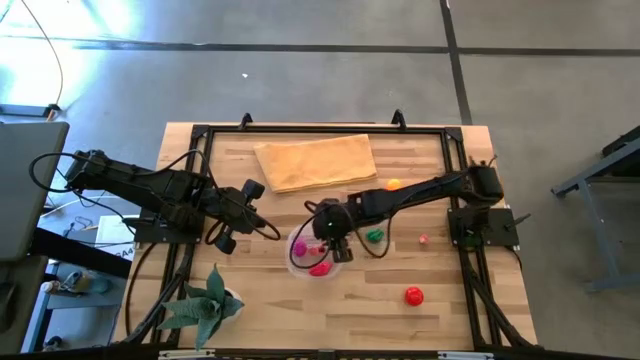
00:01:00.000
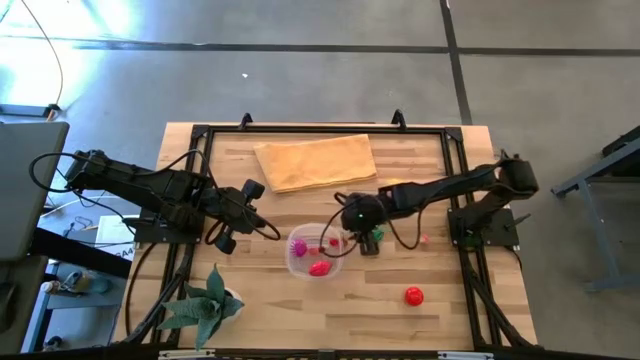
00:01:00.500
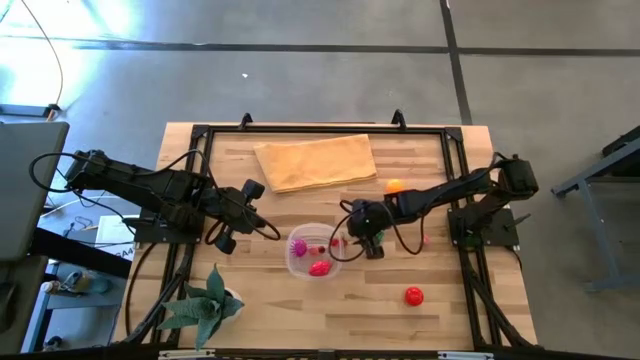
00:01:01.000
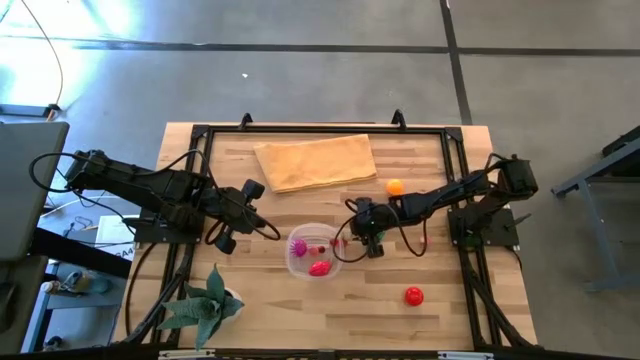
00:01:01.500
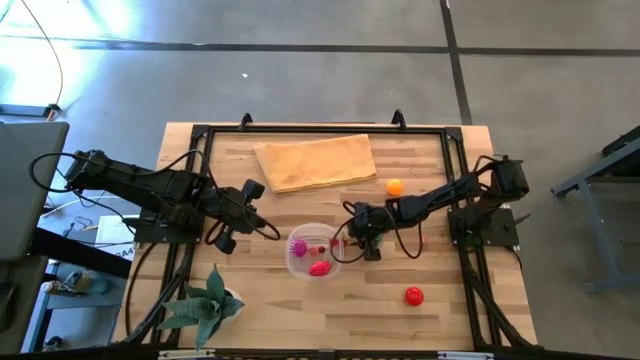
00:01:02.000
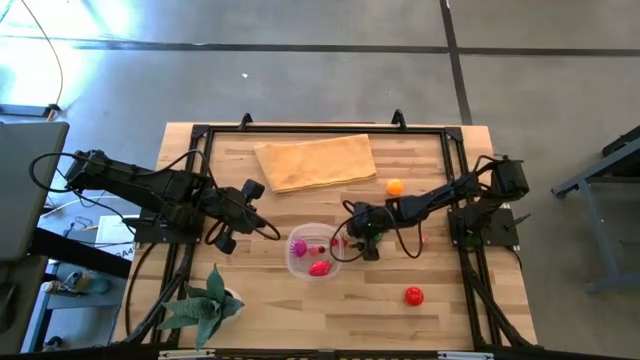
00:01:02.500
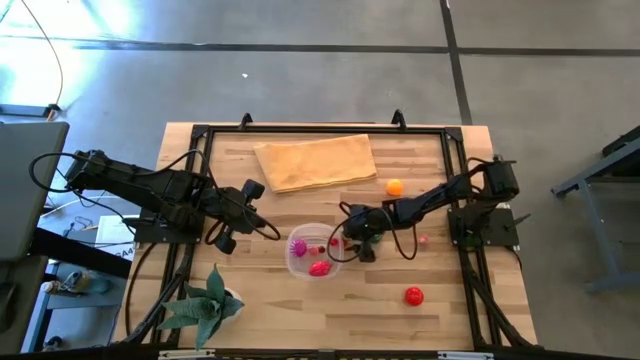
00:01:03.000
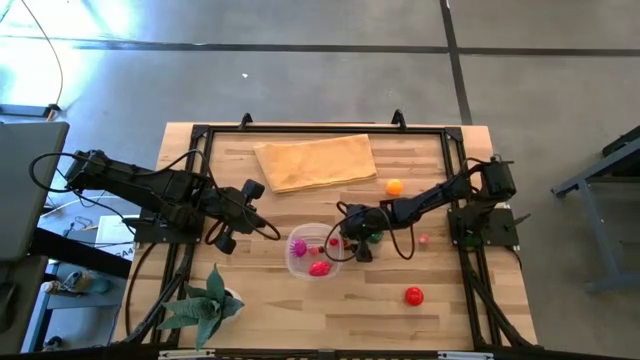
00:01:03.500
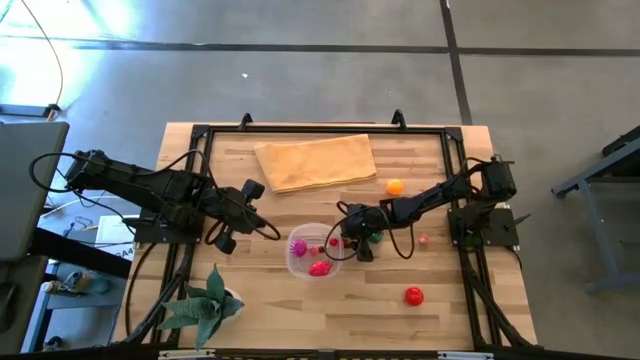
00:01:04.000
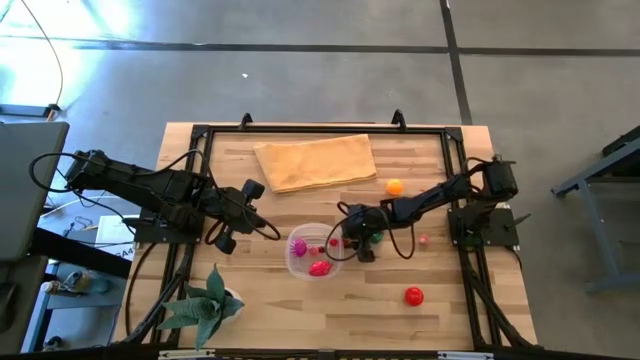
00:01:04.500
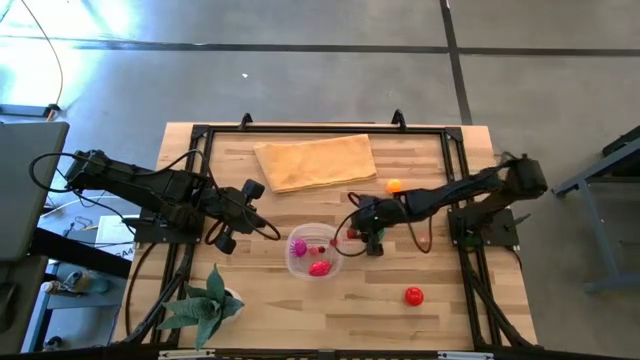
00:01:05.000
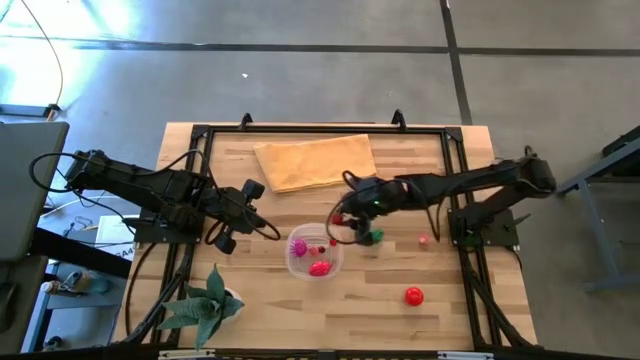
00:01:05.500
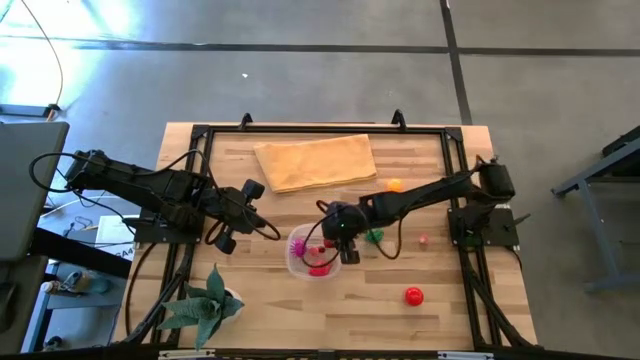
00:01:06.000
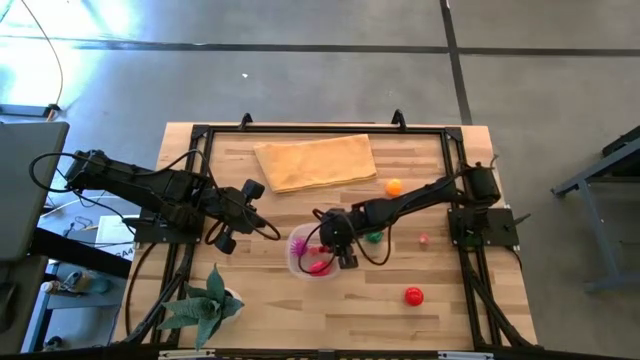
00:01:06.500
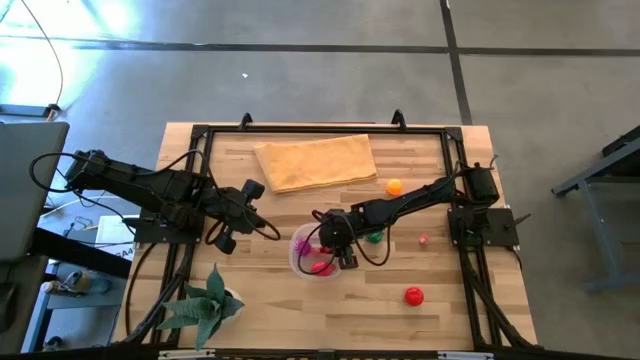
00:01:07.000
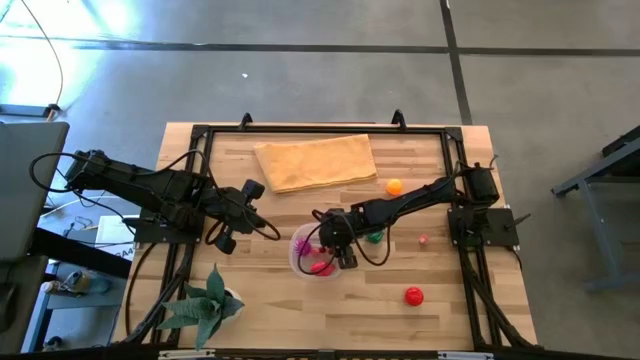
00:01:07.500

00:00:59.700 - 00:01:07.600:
Task: Pick and placing Produce into tupperware
Put the red strawberry into the transparent bin

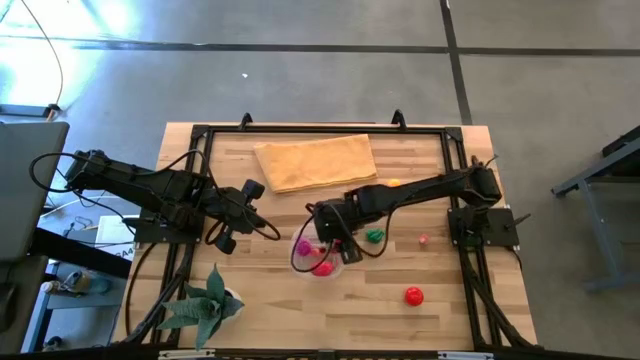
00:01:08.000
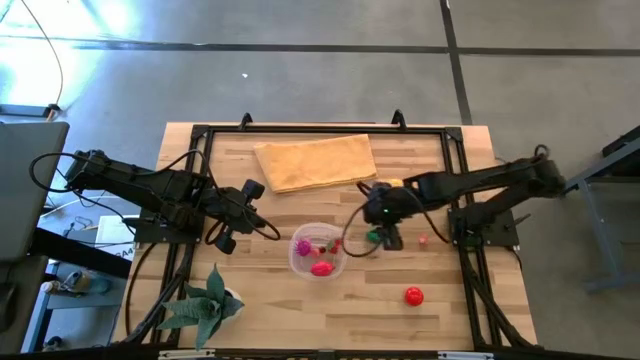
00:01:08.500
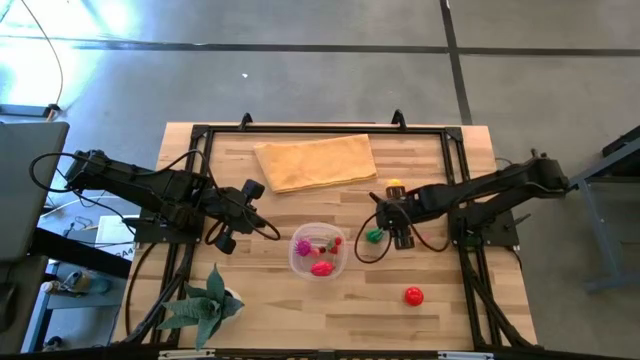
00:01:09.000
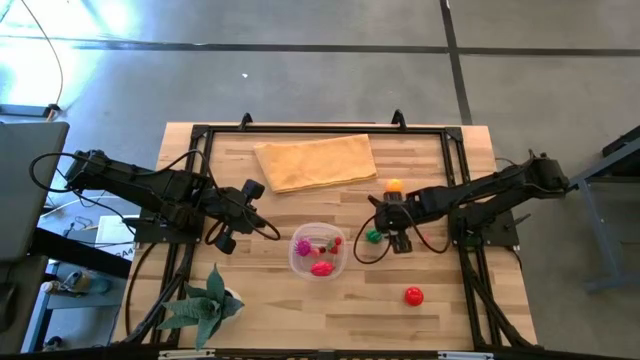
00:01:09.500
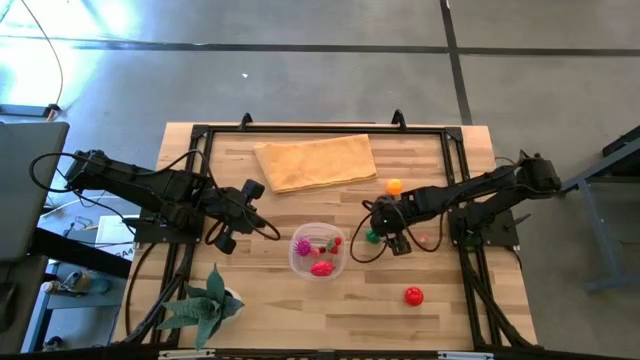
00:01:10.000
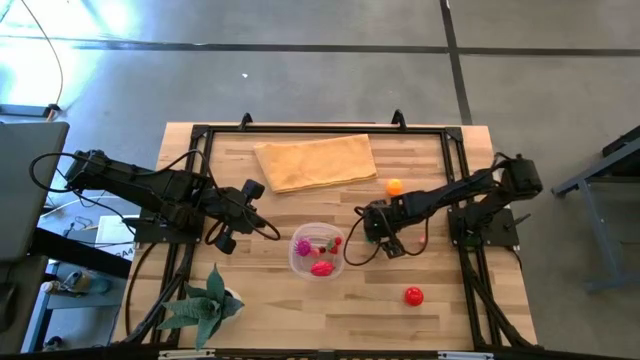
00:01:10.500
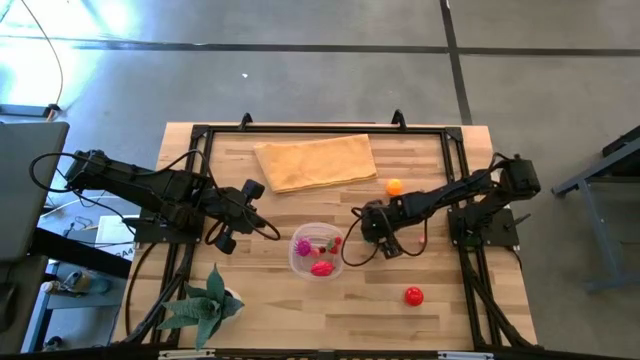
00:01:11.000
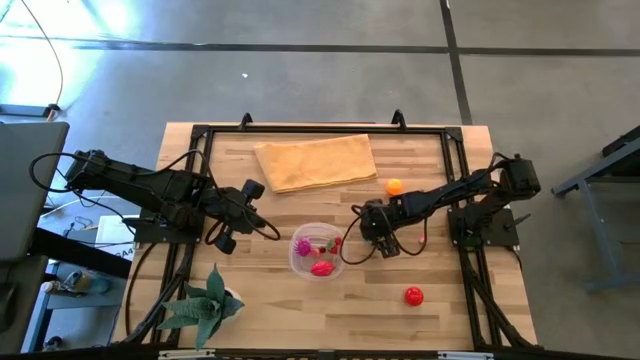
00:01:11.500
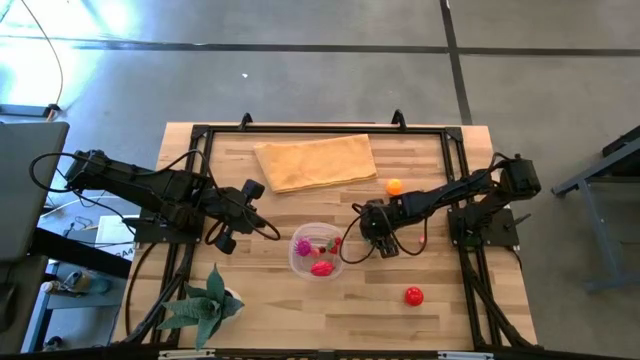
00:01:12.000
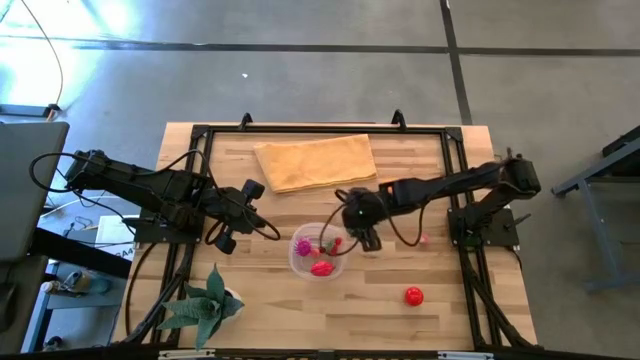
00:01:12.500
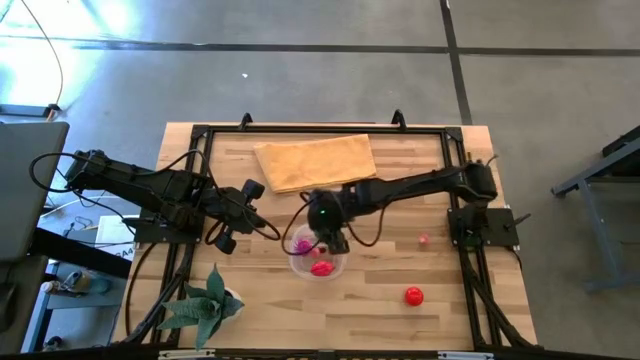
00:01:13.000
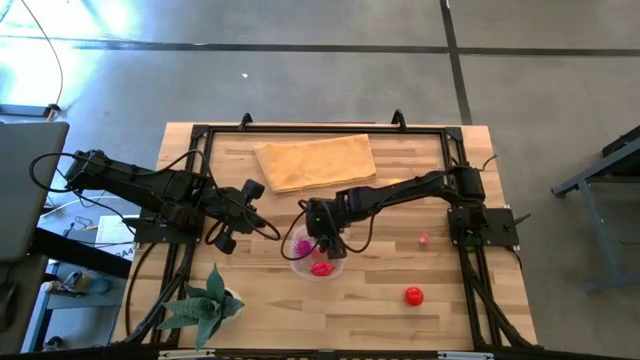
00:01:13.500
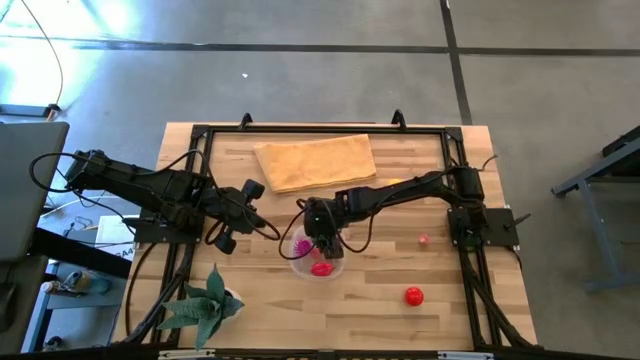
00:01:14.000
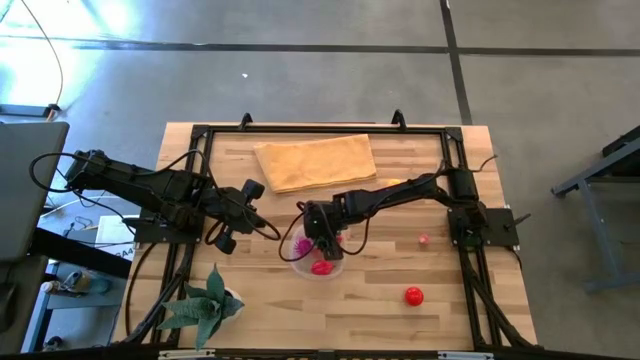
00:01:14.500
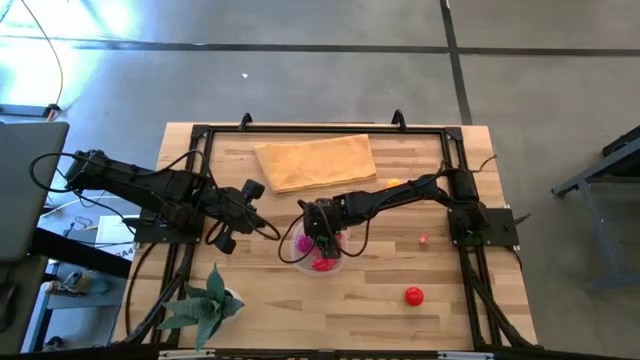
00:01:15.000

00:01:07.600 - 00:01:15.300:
Put the green bell pepper into the transparent bin

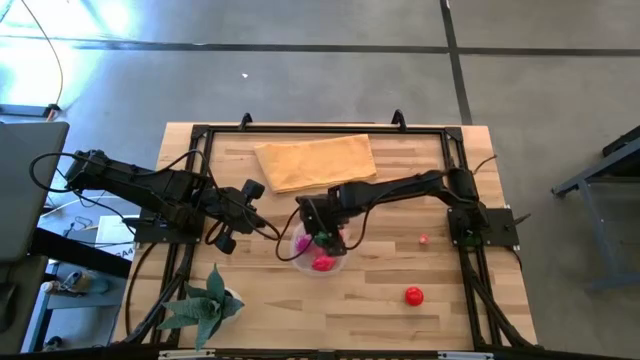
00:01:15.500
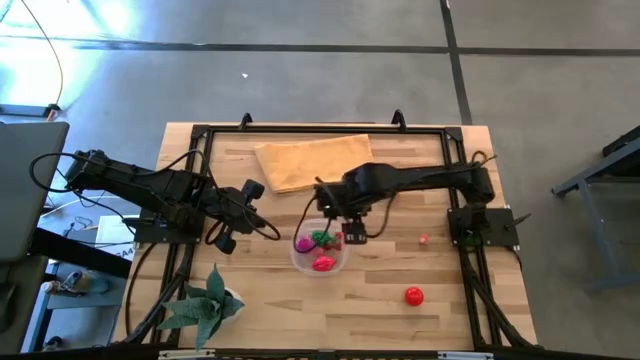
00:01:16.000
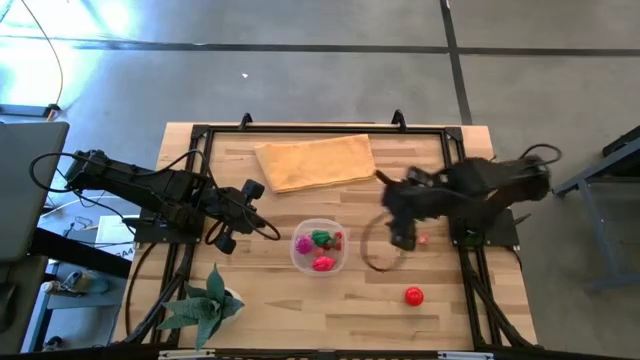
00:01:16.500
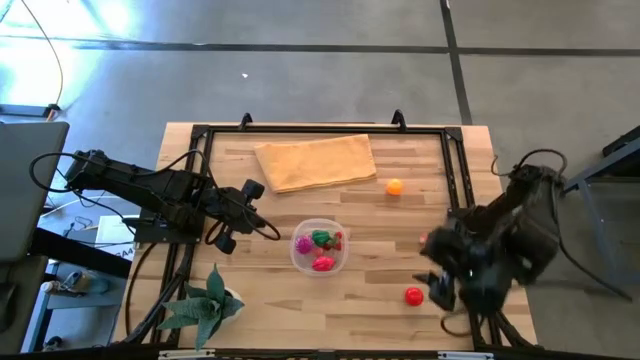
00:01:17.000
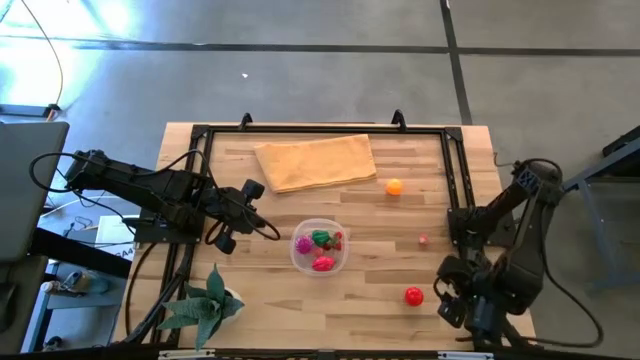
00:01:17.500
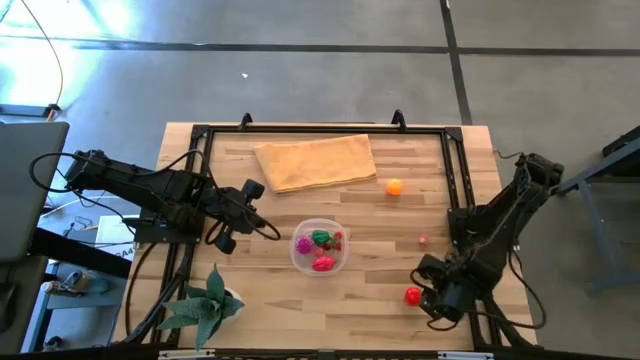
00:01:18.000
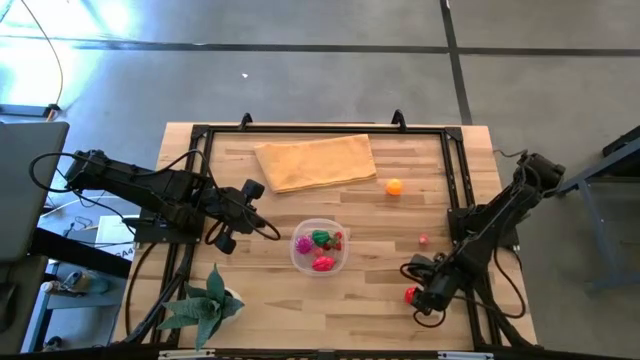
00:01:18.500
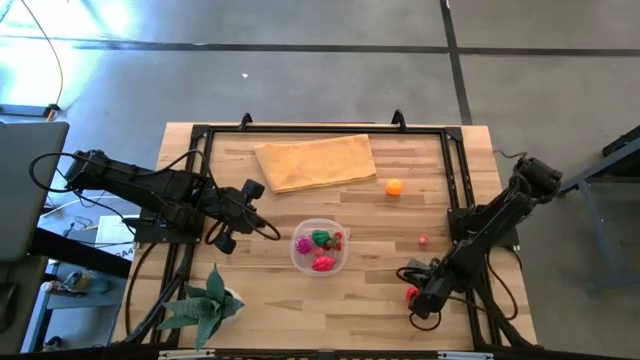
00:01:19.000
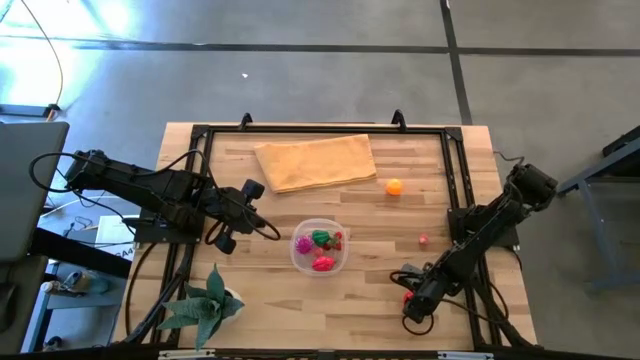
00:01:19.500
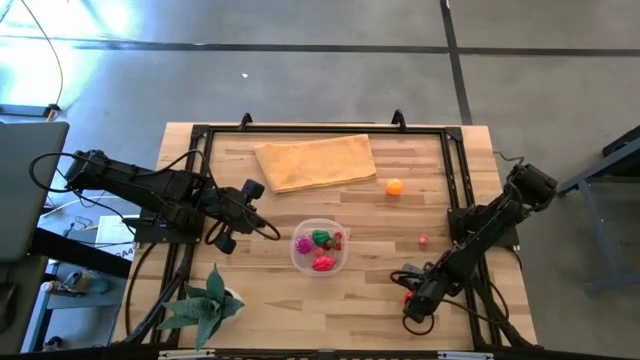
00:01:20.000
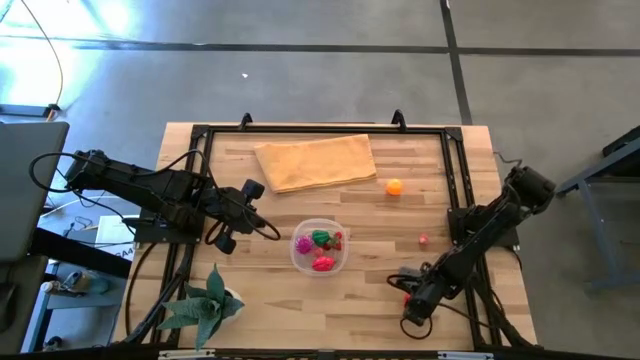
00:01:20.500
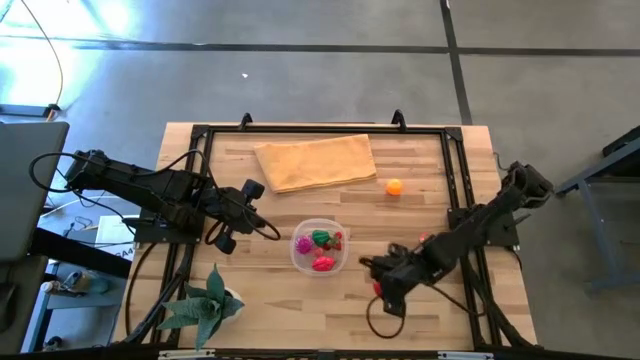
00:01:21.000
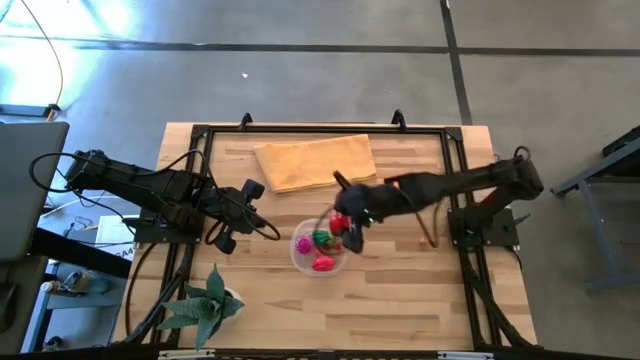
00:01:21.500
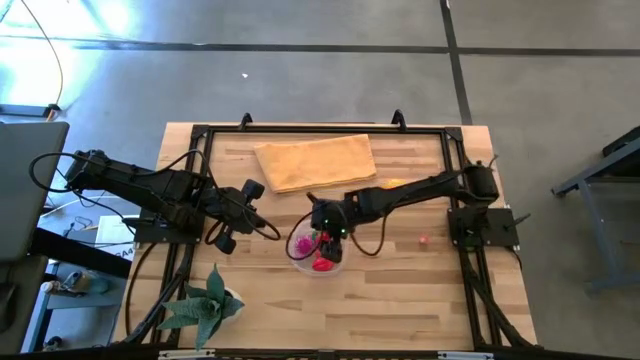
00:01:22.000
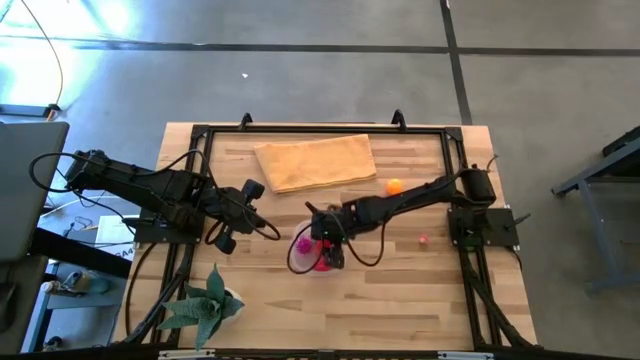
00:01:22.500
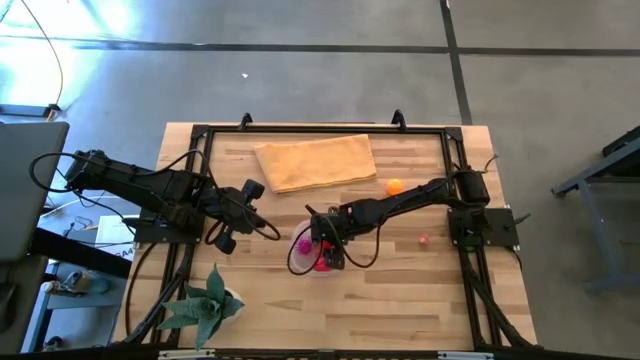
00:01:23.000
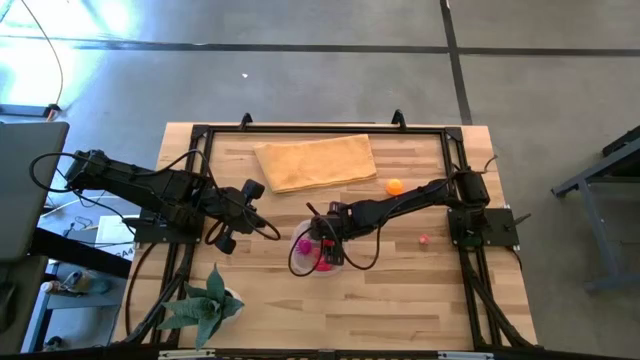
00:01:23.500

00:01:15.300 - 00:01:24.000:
Put the red tomato into the transparent bin
